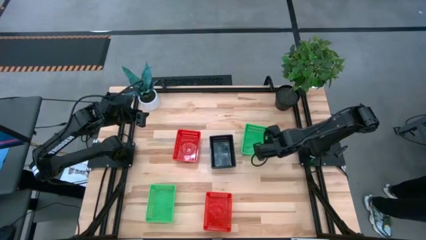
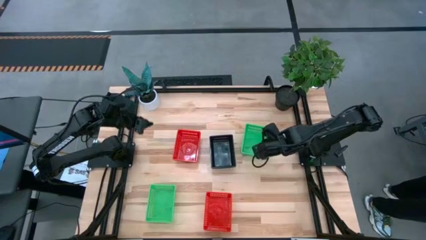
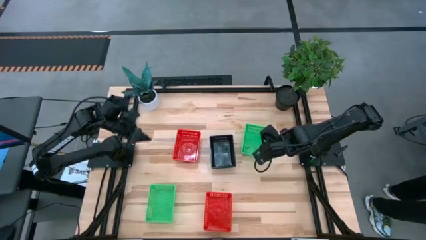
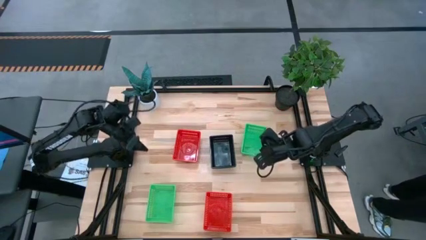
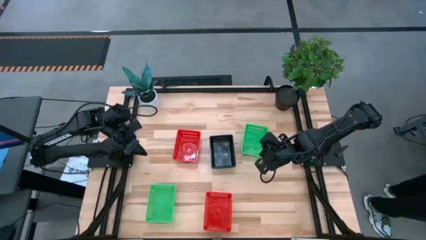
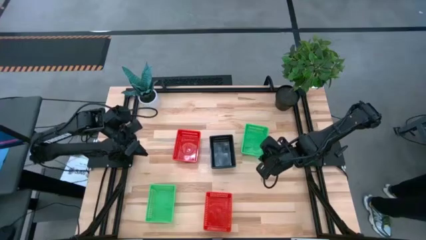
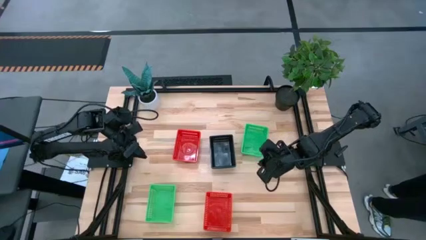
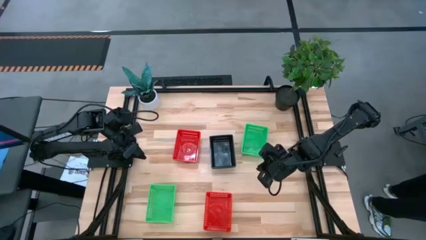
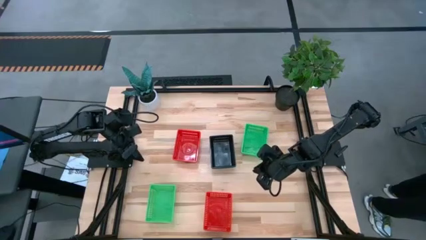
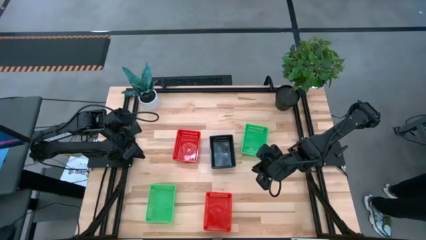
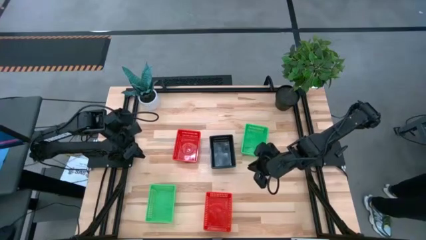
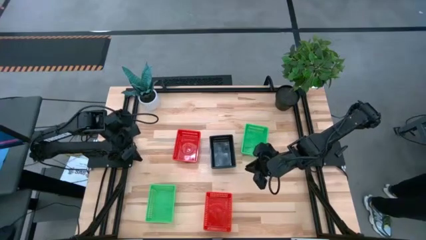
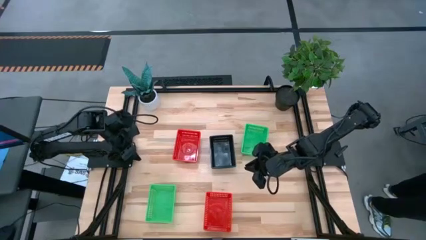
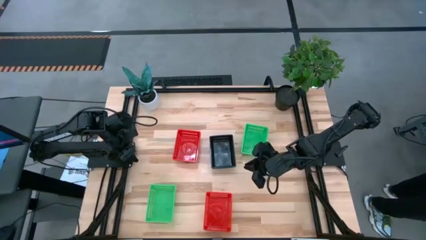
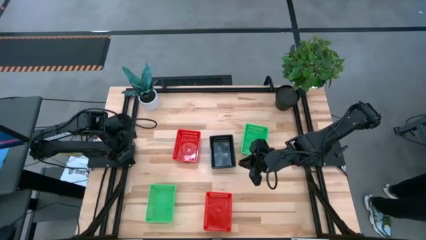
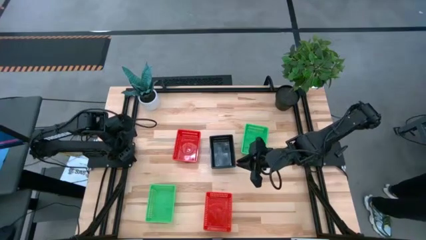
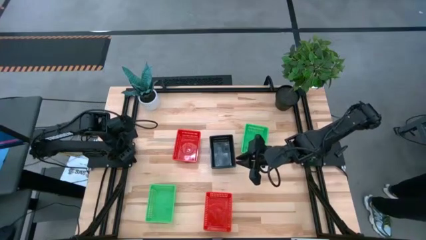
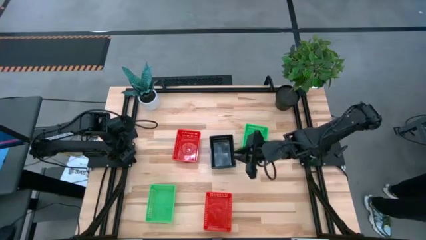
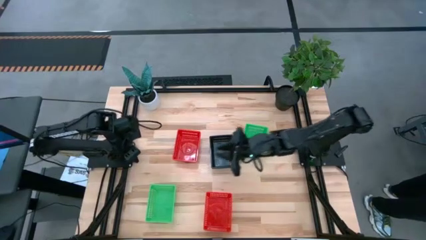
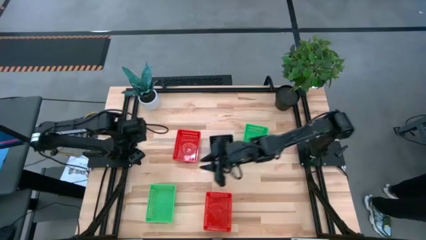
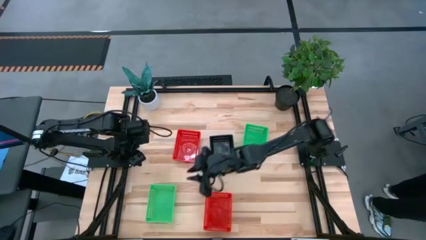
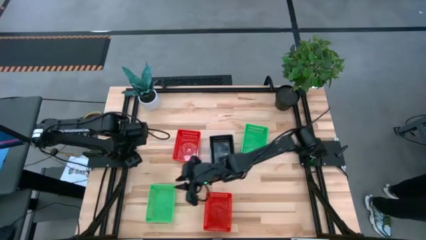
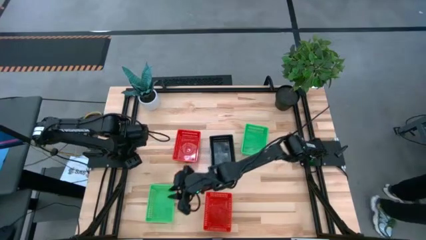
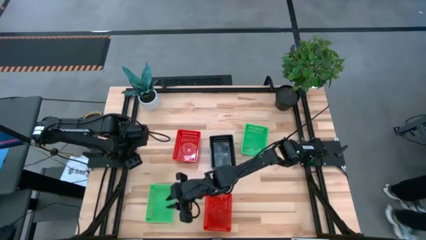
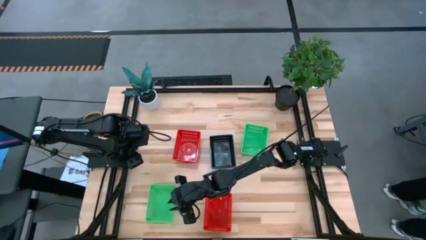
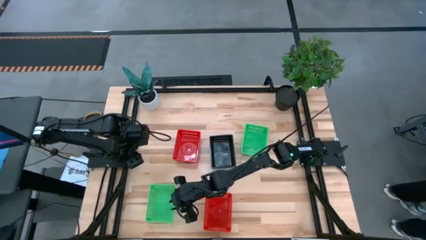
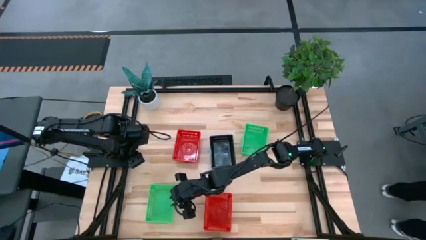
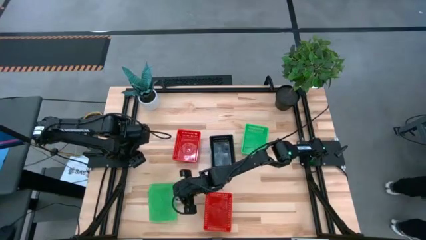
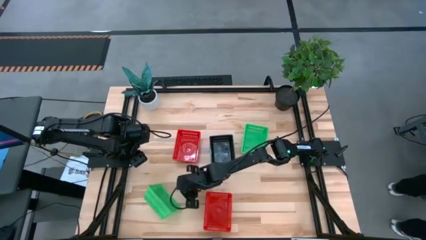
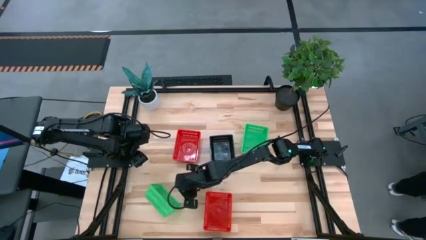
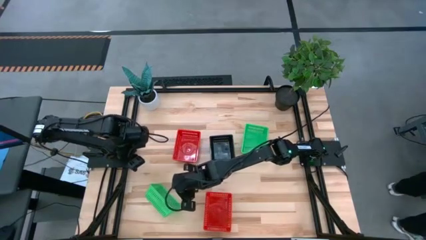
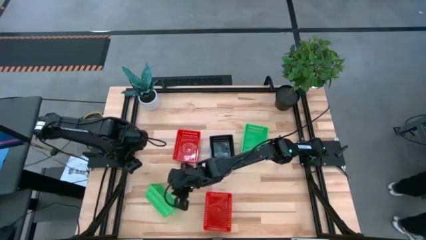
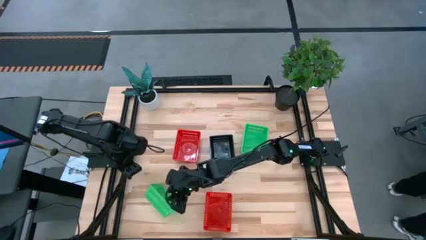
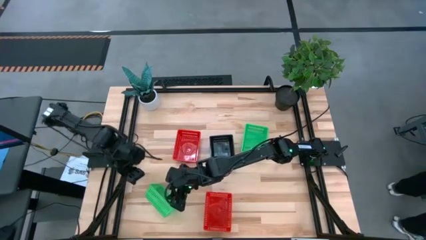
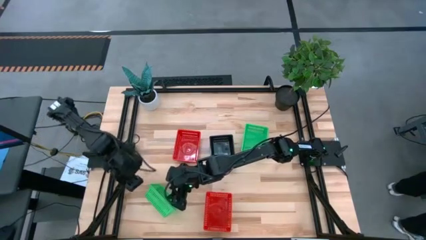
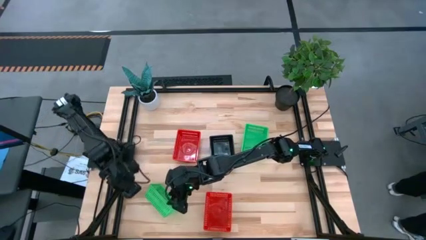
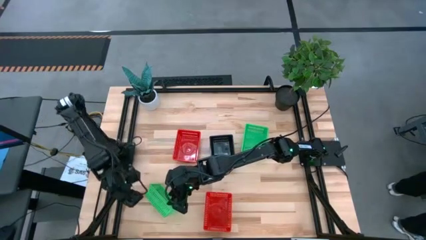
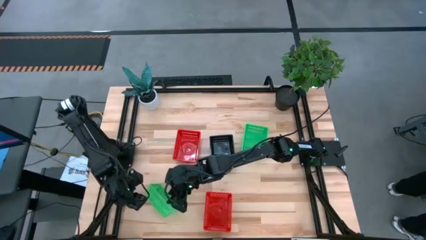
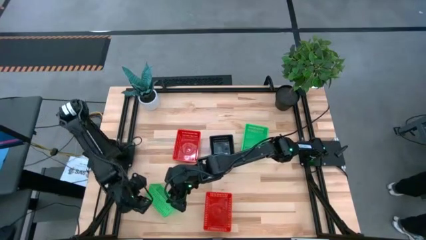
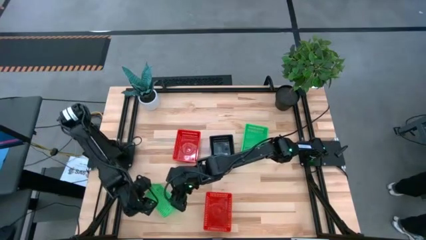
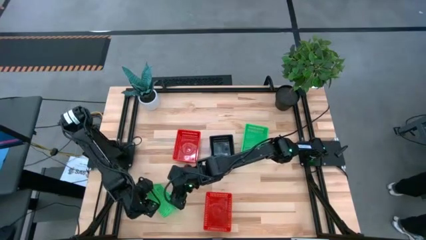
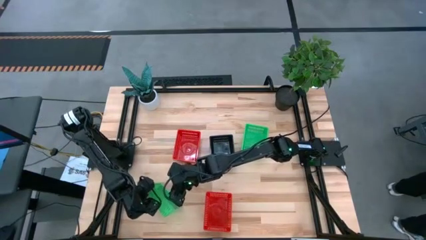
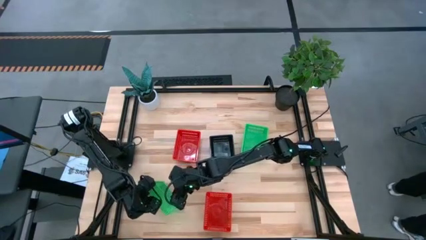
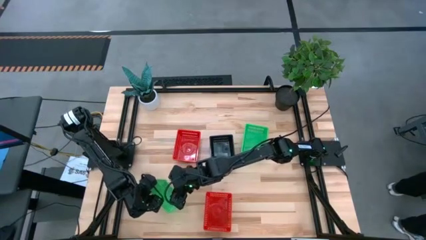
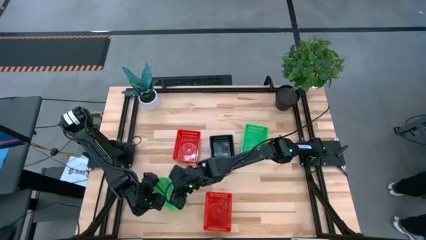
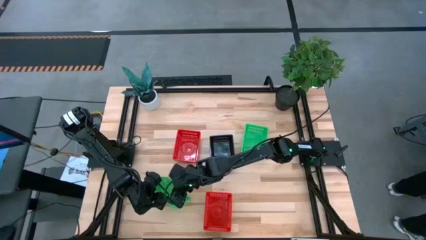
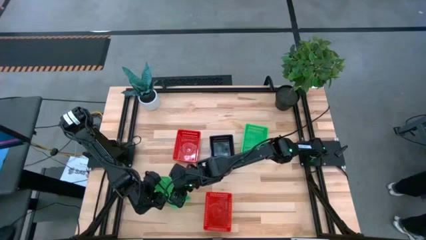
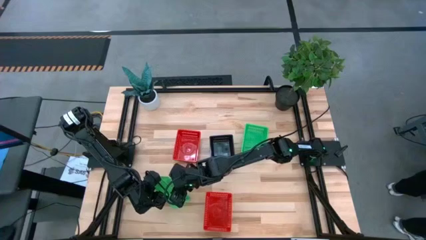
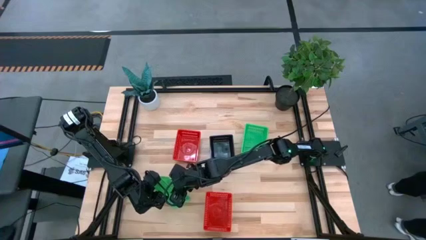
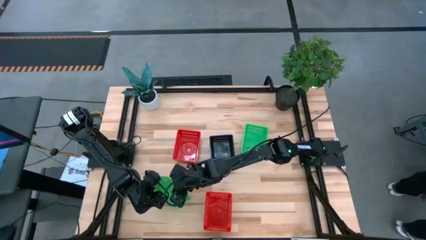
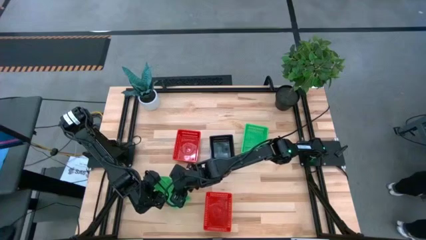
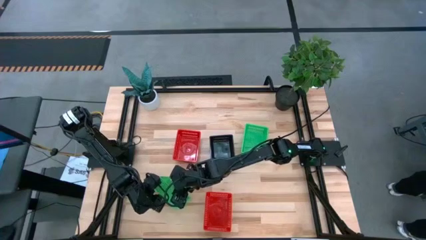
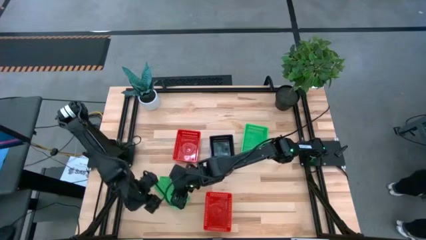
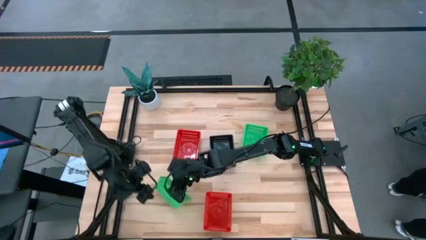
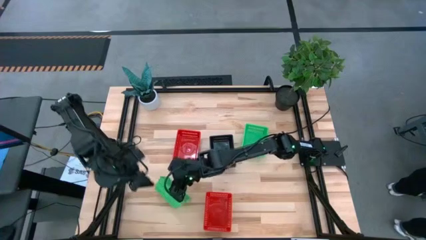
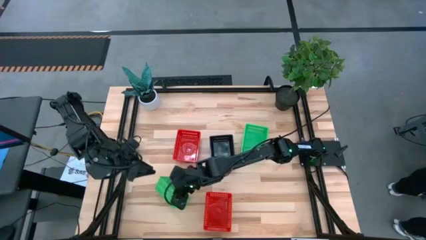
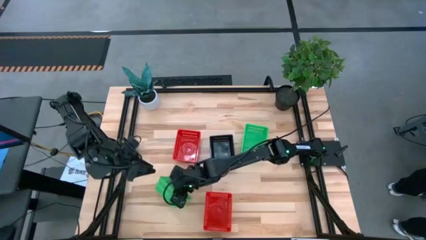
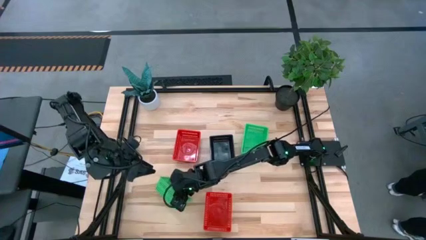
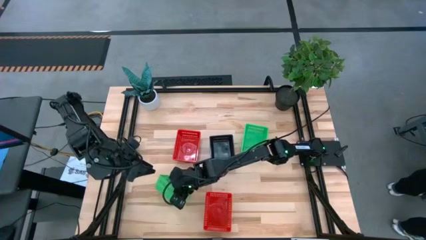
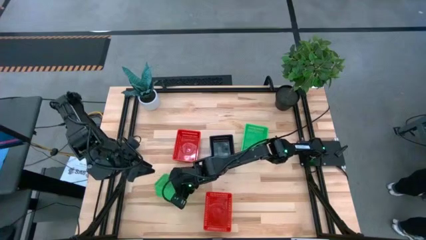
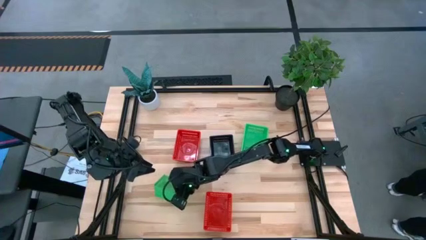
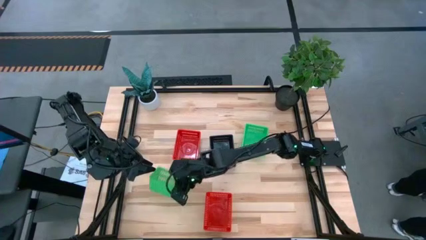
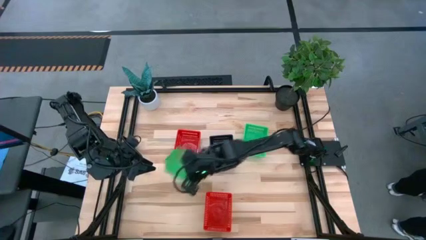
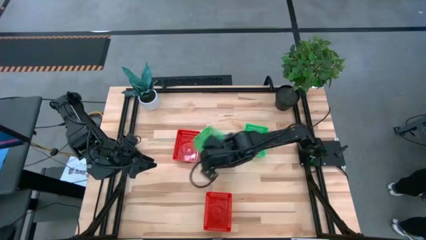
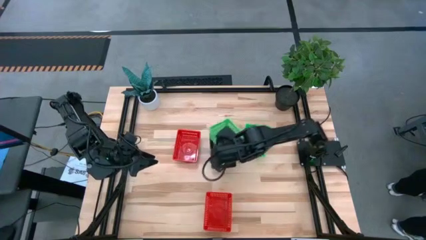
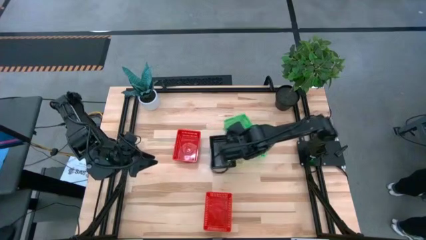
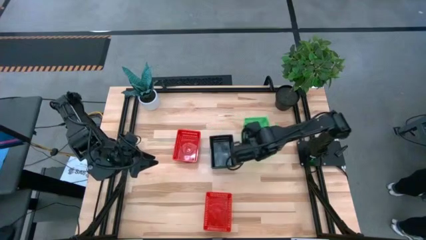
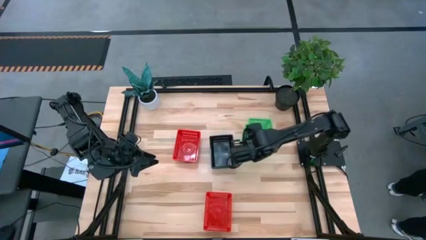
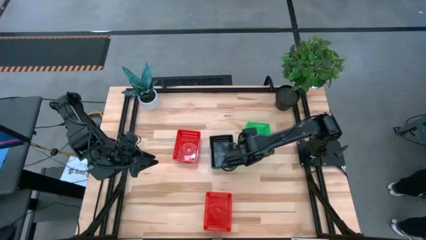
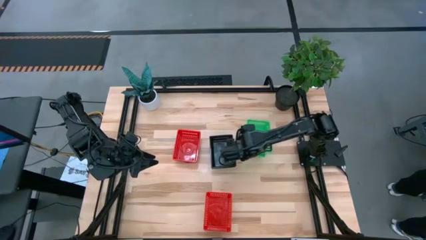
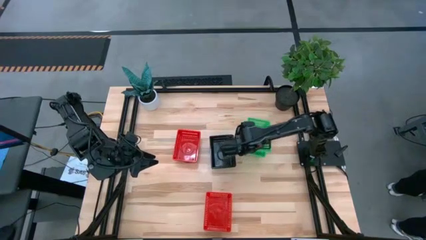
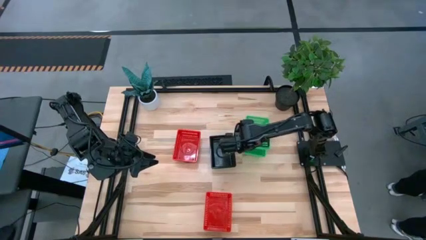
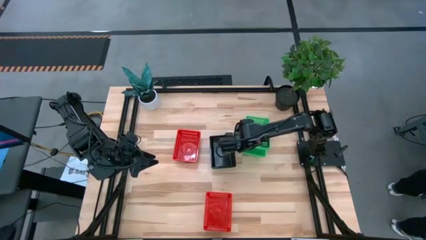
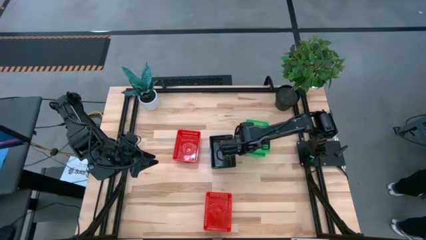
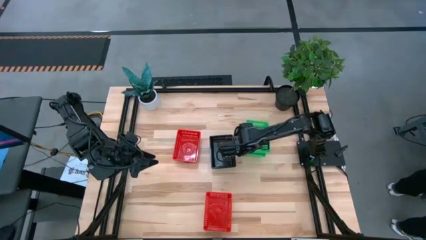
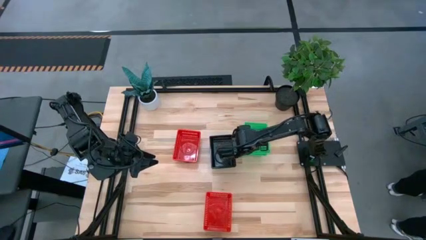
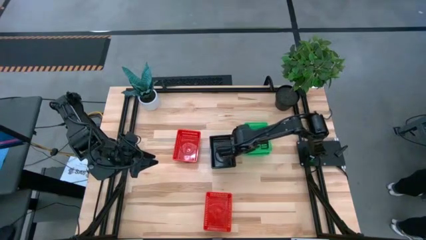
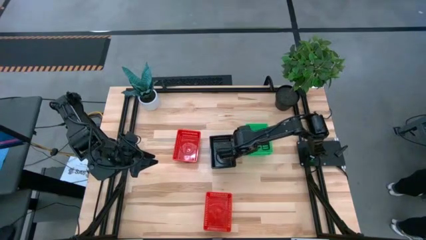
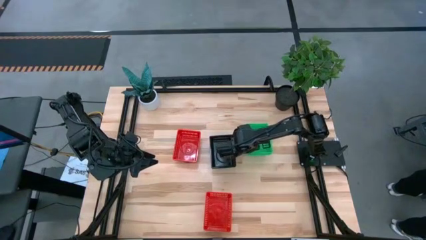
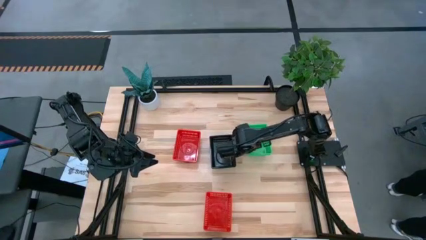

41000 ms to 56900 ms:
Stack the bottom green basket on the green baskets

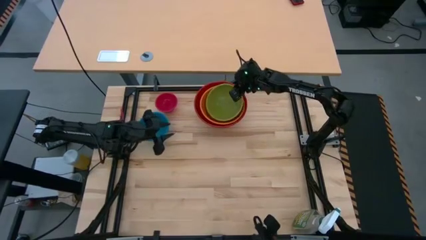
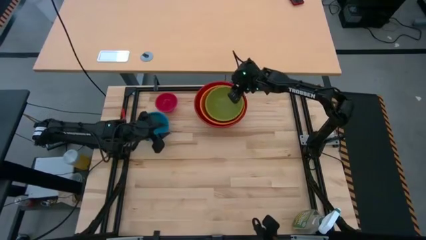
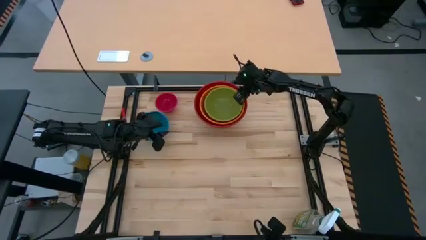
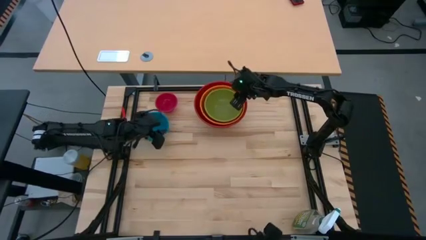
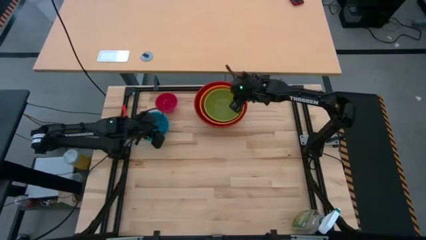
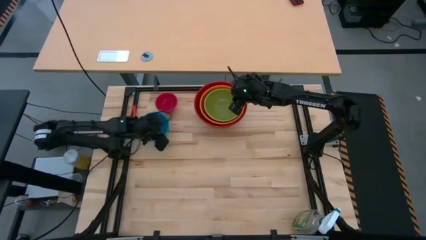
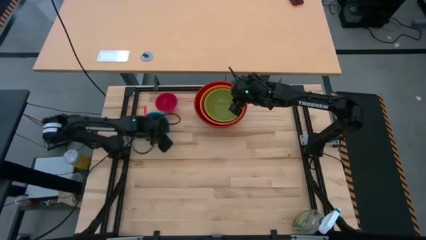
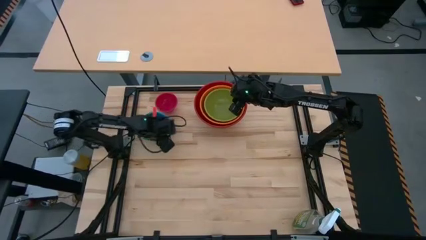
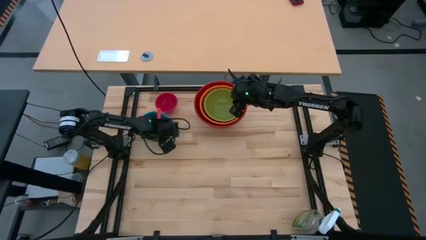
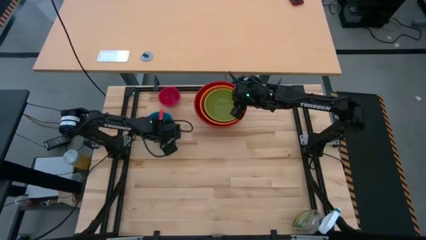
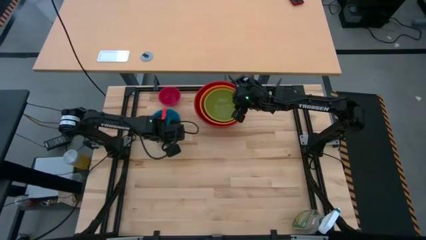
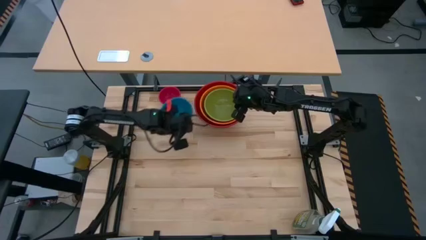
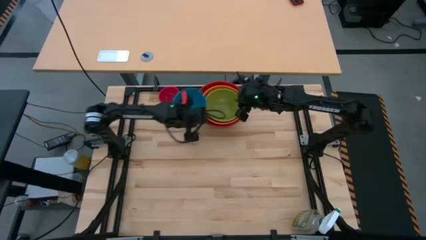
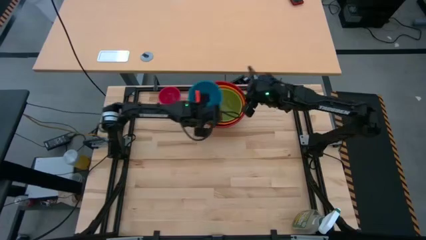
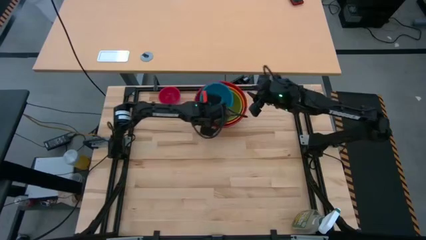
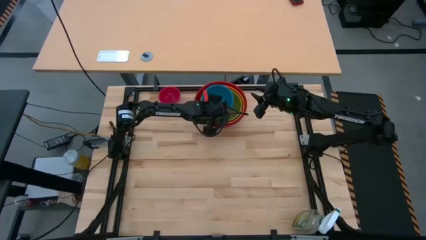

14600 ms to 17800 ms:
Stack the blue bowl on top of the green bowl
